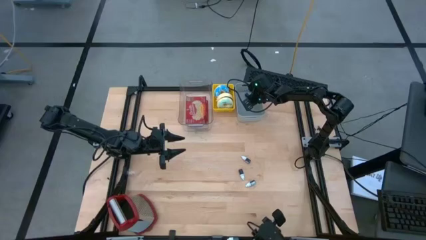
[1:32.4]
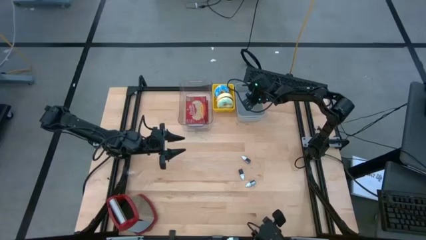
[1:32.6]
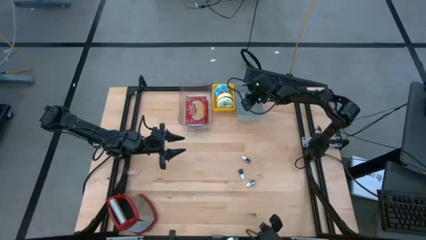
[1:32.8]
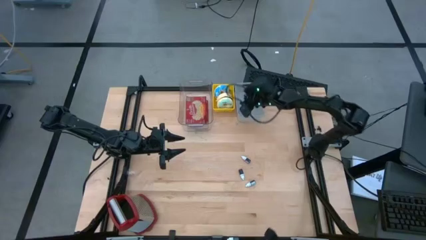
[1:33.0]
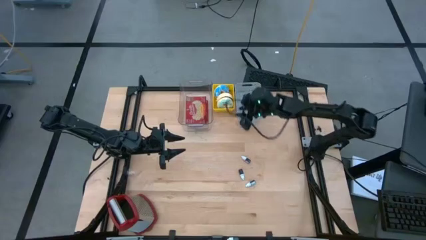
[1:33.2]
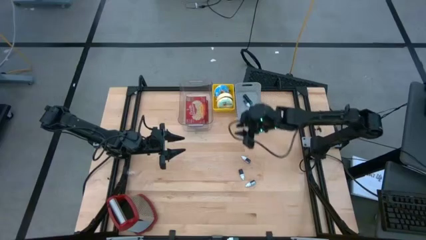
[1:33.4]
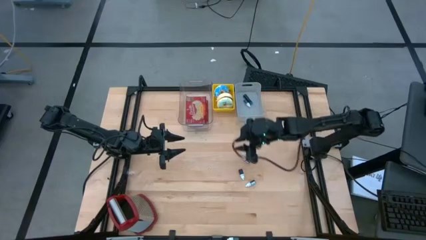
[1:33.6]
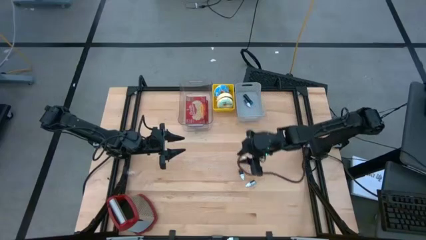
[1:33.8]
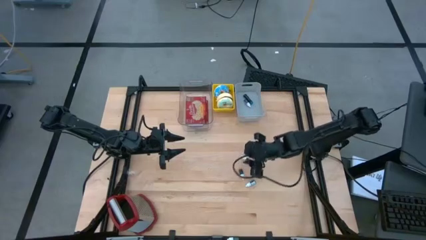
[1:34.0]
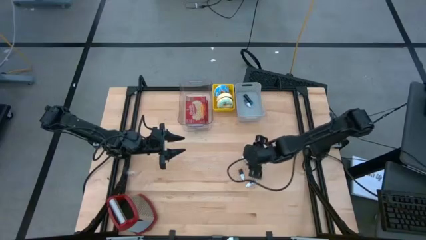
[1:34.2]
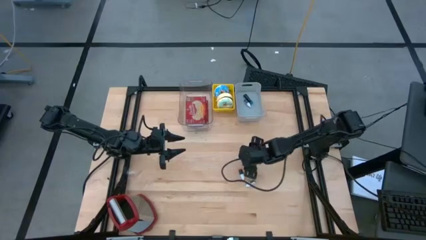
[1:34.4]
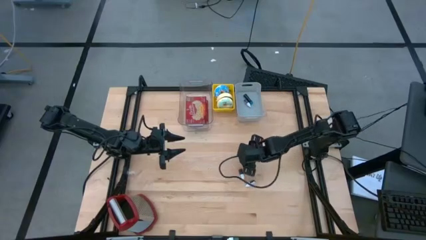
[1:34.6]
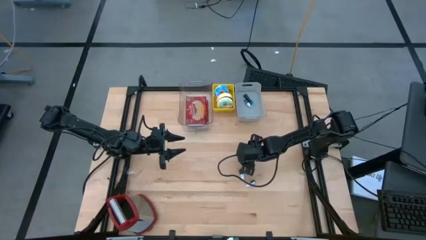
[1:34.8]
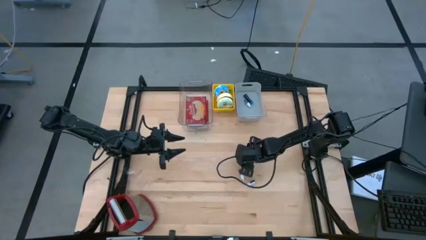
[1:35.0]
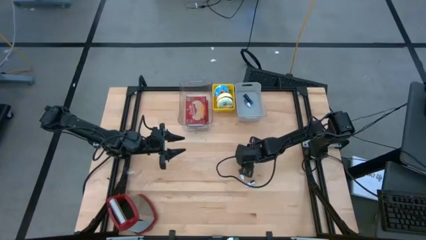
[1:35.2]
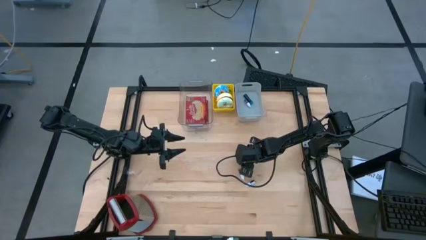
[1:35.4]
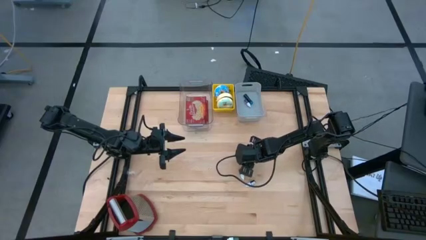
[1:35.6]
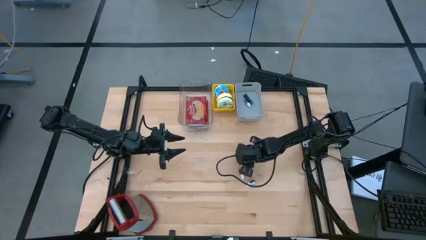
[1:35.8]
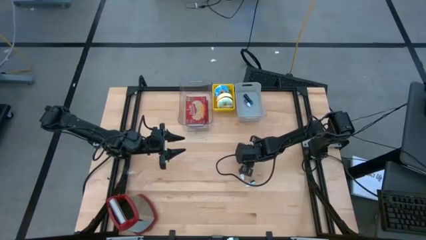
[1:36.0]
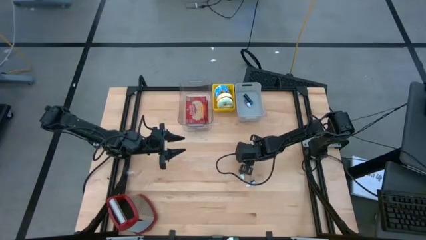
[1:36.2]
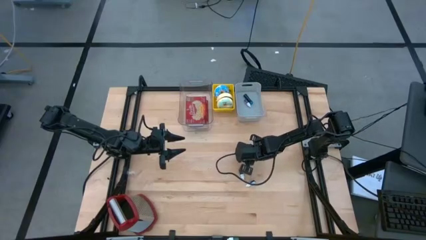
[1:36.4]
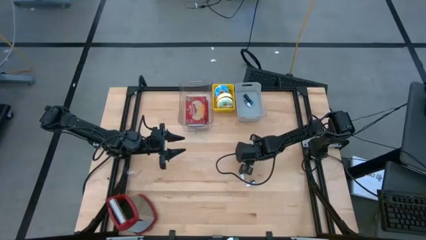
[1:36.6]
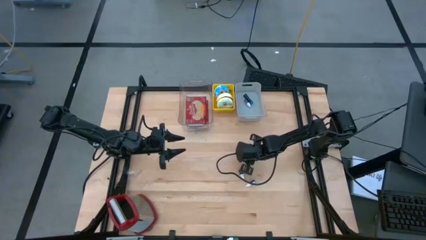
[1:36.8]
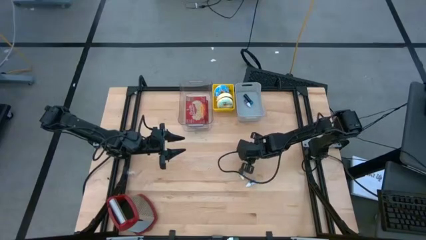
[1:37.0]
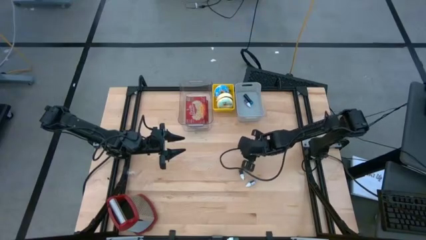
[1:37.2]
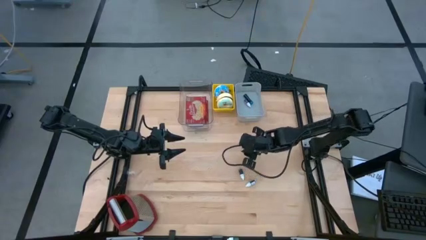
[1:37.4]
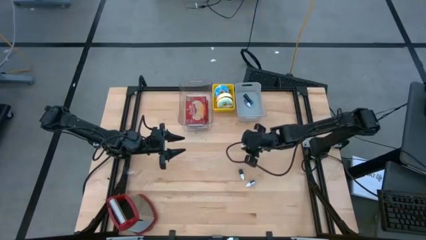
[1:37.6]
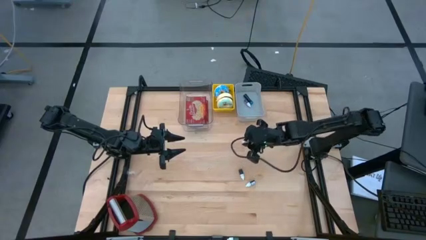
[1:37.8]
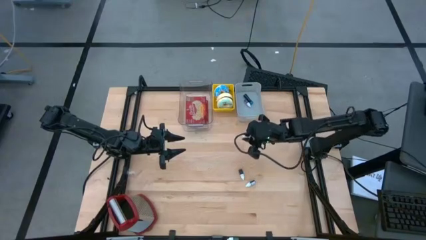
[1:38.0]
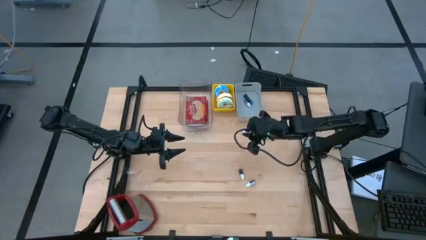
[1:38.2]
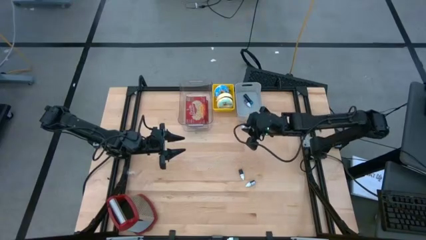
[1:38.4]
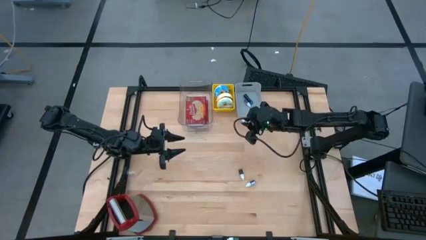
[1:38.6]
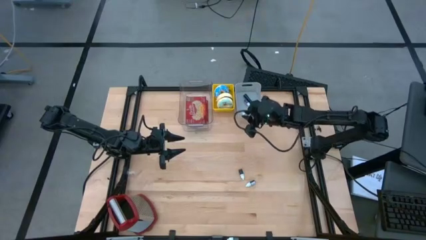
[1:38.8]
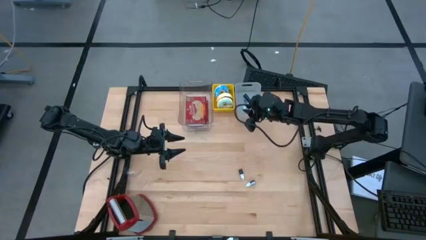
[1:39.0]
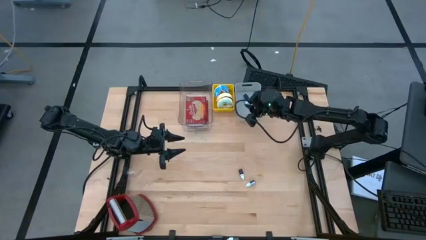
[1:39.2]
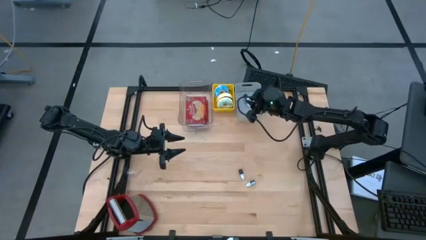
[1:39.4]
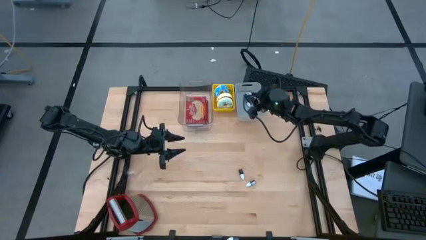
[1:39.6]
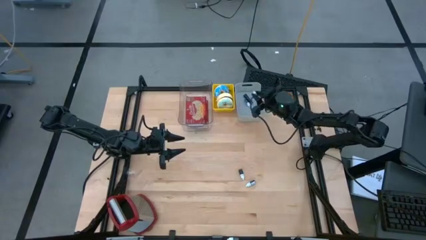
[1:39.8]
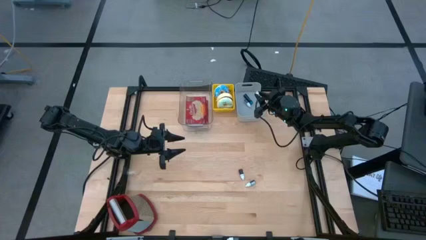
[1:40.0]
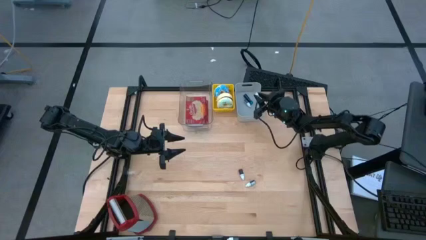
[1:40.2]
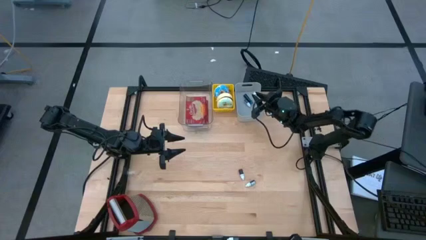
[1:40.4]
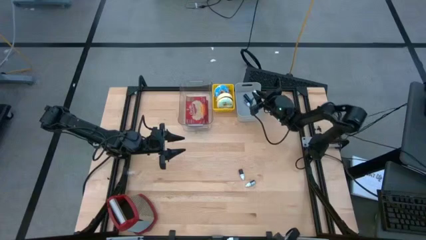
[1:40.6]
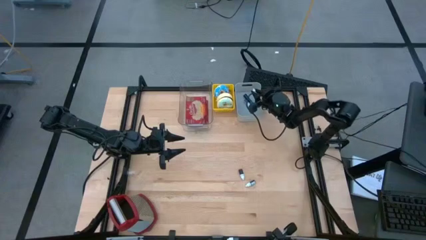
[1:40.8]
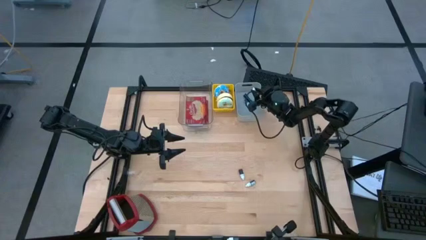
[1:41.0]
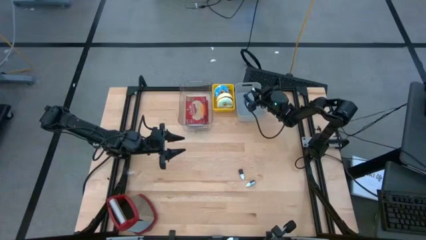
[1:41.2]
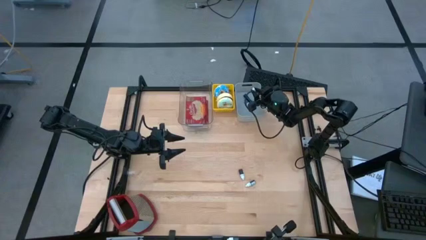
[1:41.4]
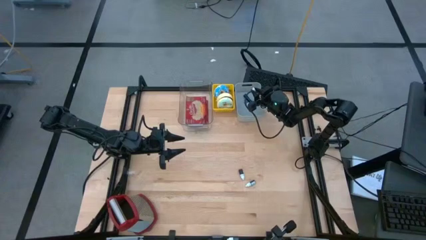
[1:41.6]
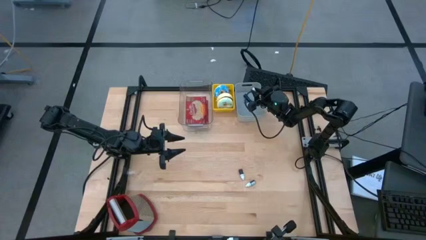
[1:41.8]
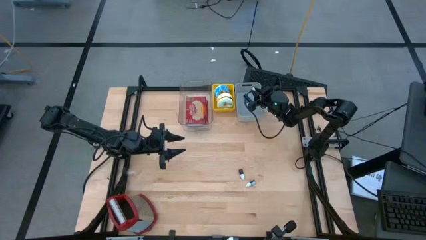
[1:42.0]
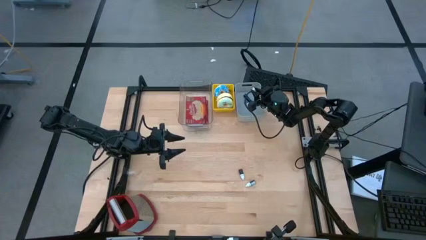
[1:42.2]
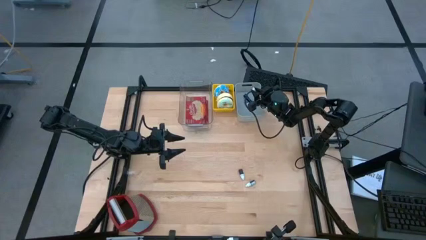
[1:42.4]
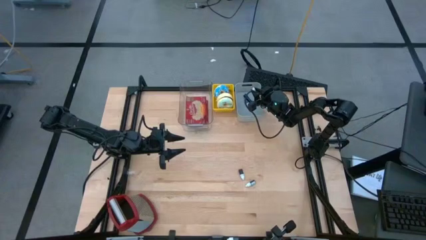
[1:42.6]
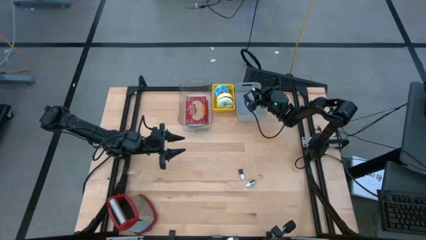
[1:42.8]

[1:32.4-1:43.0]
Put the small blue food coloring bottle into the grey bin

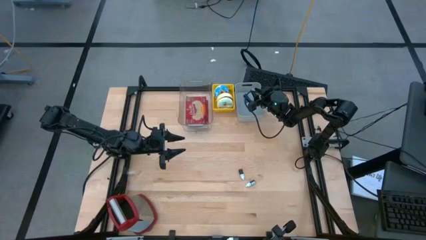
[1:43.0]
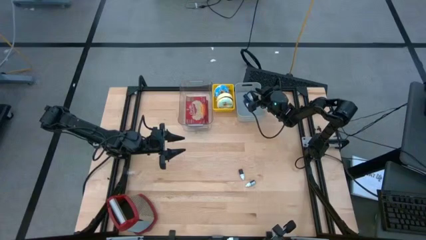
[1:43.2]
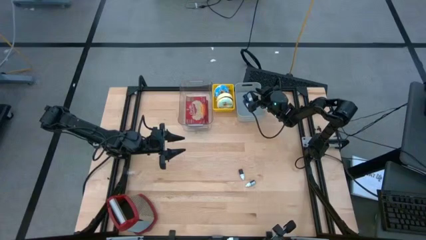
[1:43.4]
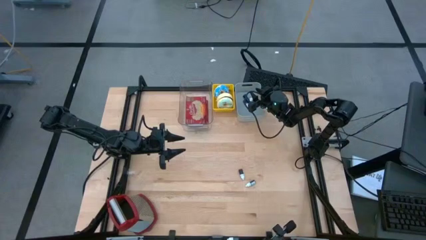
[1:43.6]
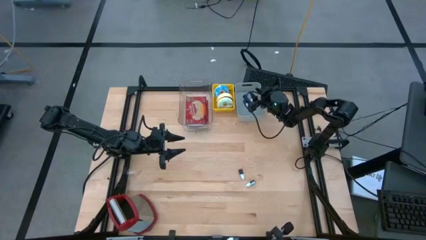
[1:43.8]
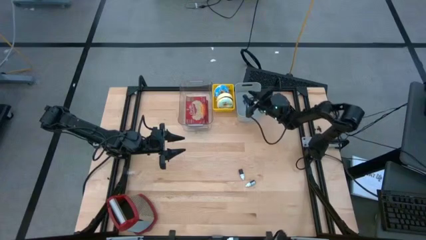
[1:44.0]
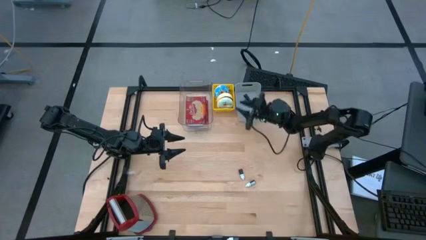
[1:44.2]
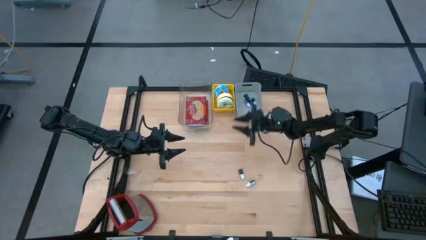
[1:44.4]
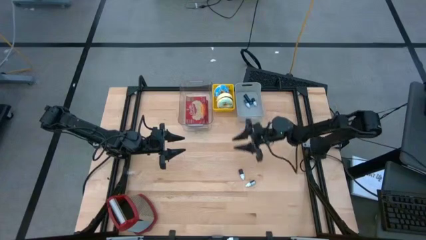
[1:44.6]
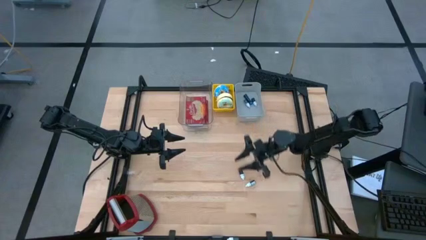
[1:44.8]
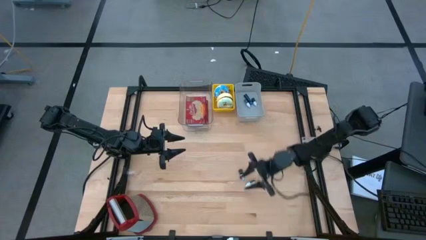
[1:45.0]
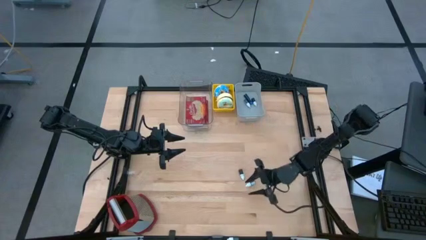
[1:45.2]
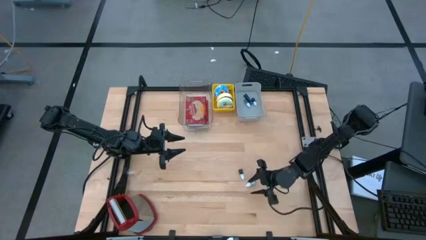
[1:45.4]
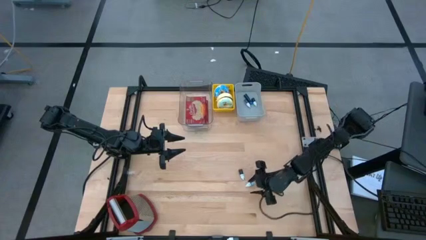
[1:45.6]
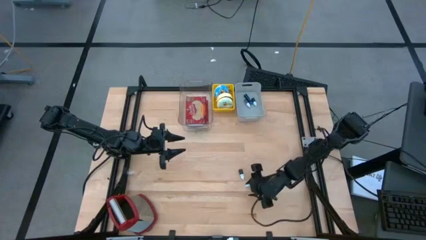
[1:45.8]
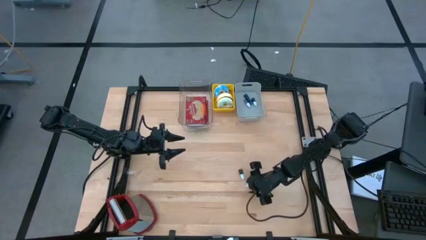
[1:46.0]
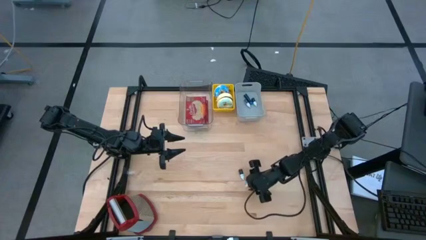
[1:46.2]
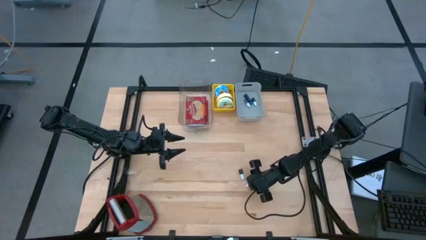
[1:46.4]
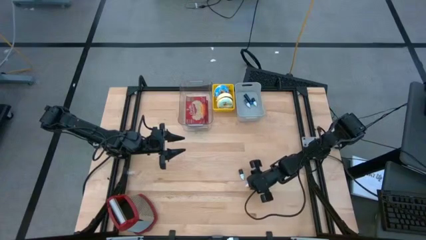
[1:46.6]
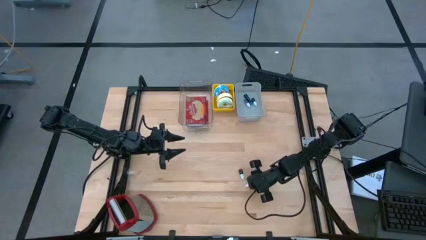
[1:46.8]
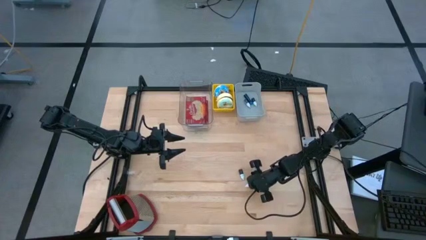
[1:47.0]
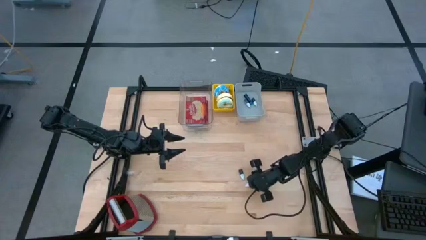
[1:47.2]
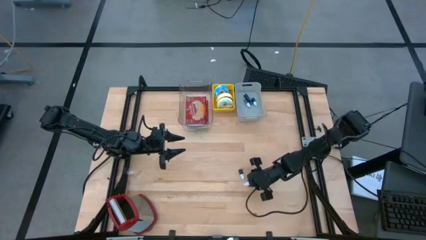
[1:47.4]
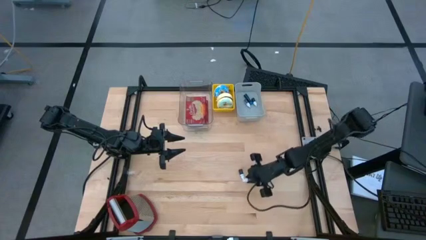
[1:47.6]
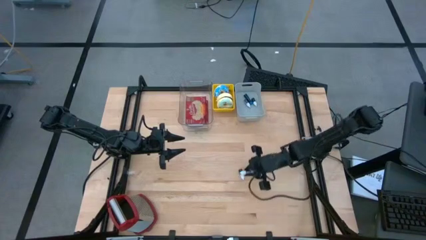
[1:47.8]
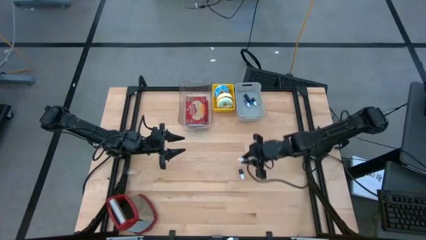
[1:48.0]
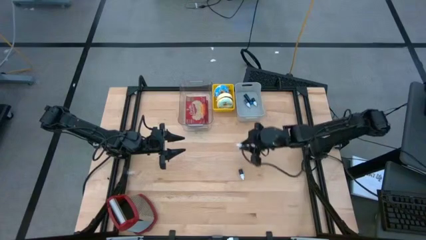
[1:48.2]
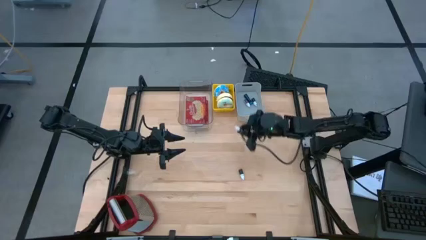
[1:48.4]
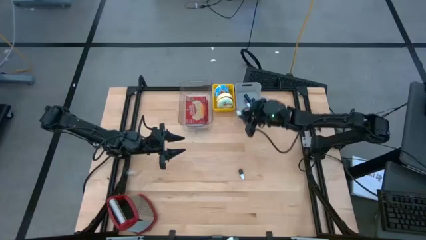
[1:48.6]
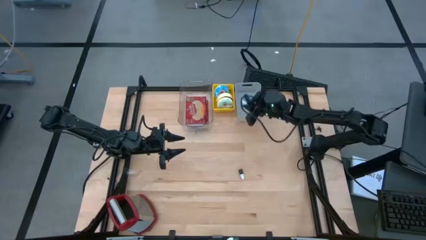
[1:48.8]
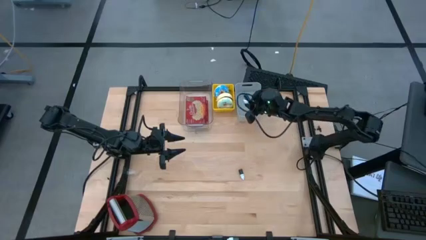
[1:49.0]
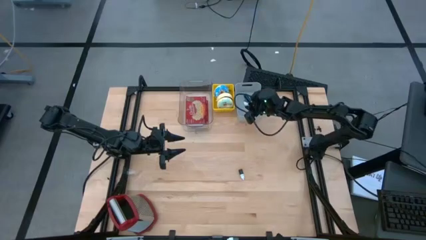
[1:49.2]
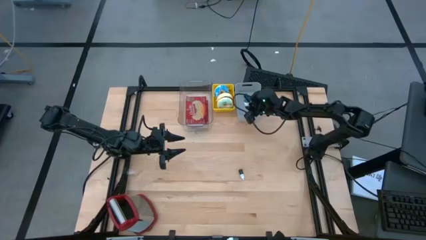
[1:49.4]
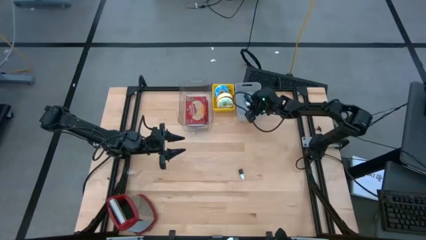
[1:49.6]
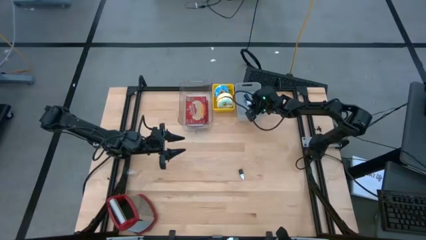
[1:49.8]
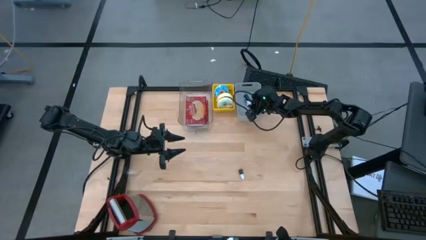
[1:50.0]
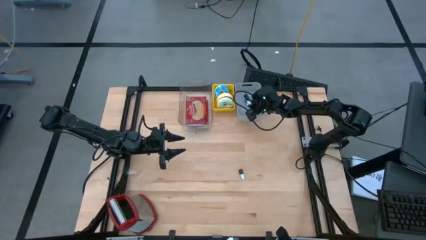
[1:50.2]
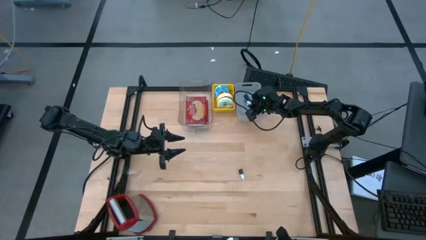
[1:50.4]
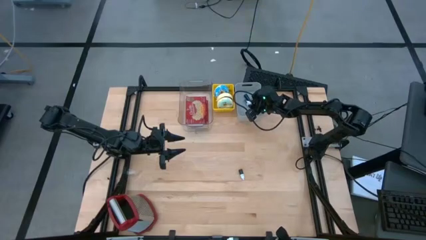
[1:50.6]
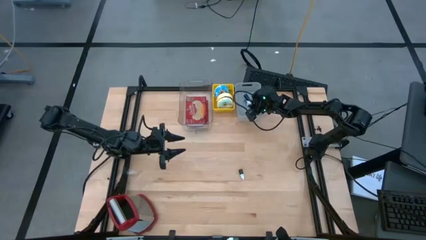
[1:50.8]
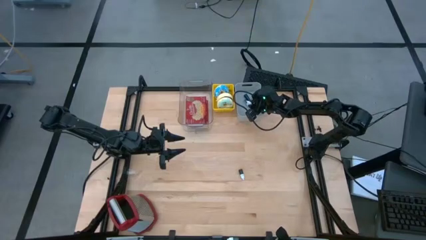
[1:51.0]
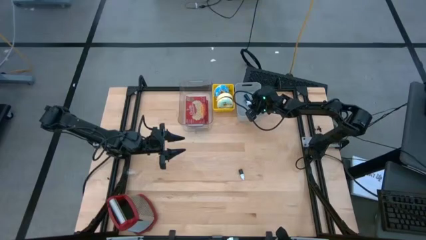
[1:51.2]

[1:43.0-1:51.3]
Put the green food coloring bottle into the grey bin
